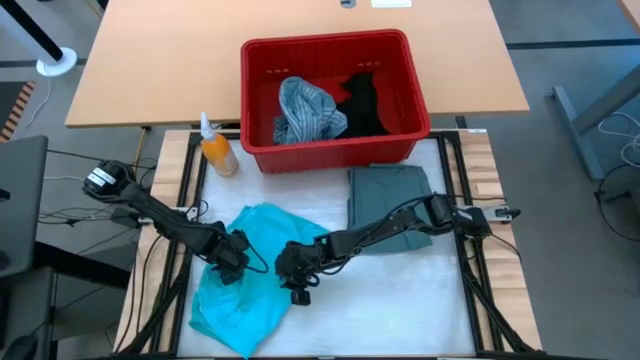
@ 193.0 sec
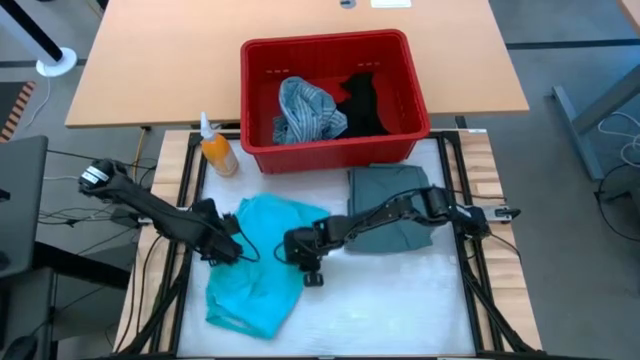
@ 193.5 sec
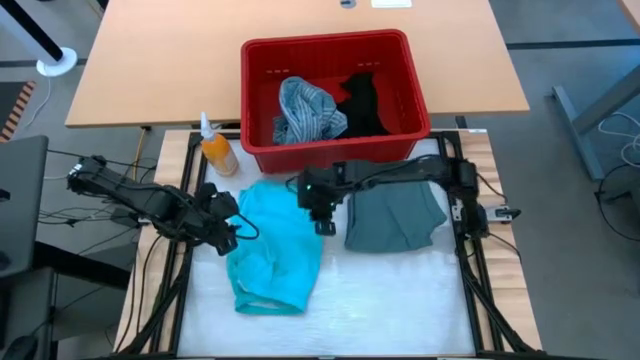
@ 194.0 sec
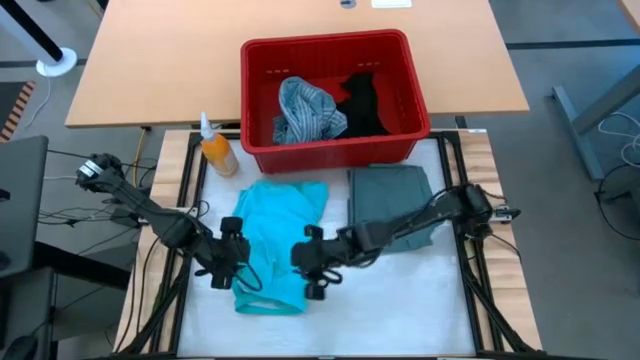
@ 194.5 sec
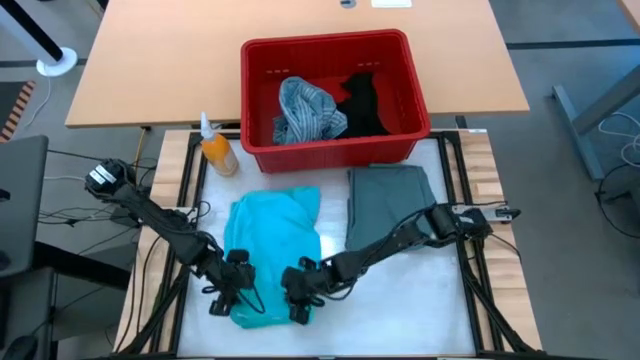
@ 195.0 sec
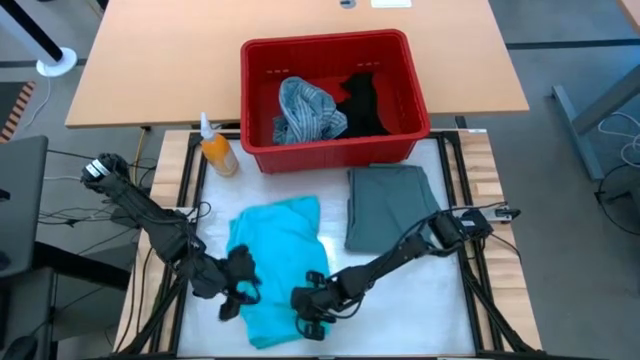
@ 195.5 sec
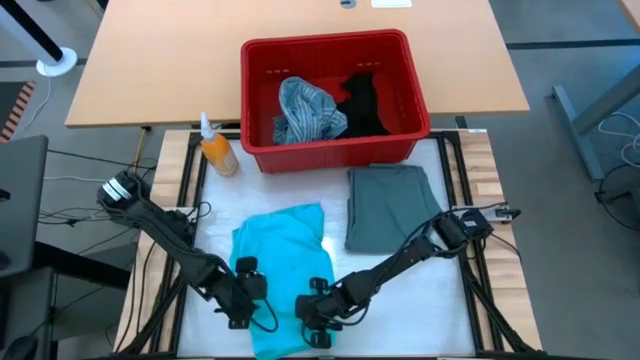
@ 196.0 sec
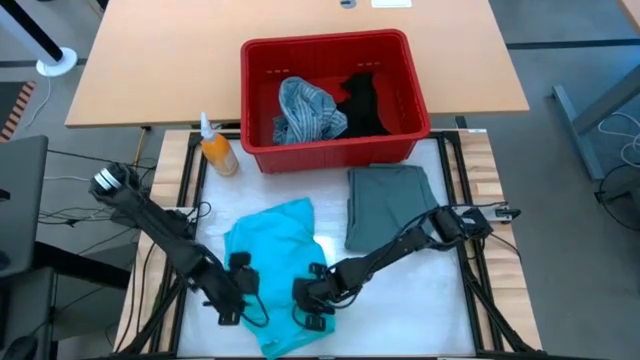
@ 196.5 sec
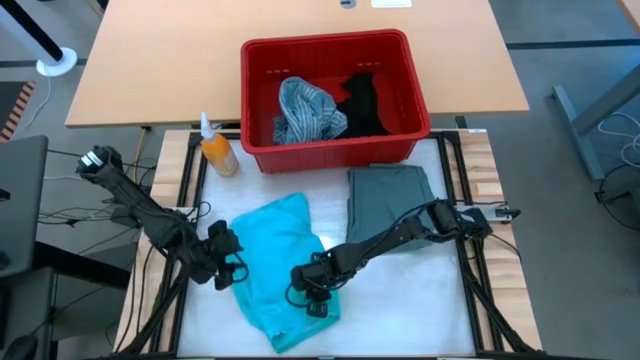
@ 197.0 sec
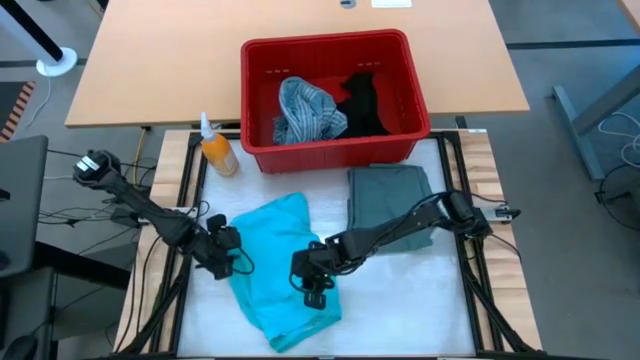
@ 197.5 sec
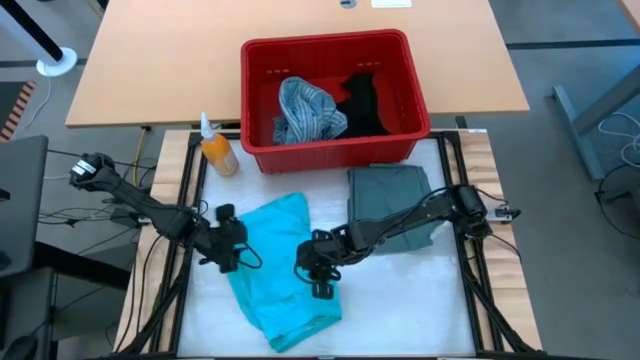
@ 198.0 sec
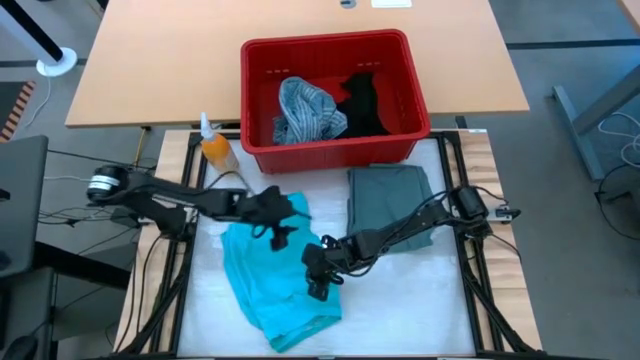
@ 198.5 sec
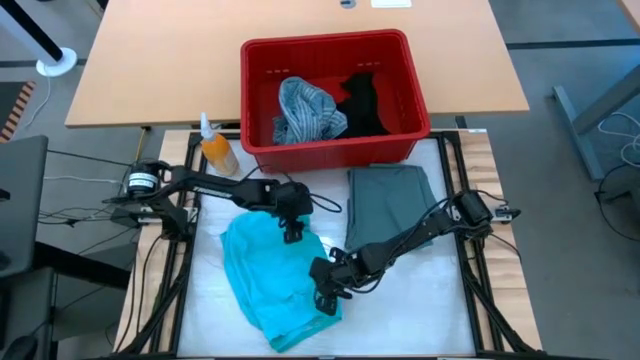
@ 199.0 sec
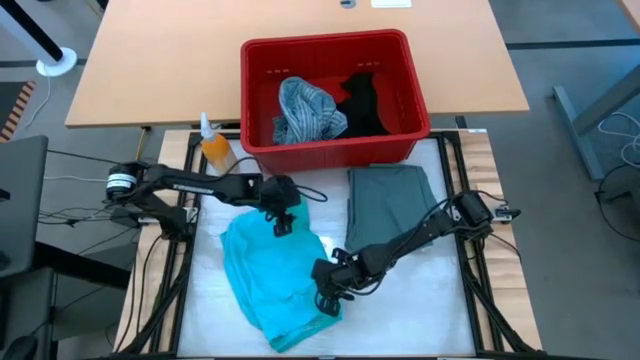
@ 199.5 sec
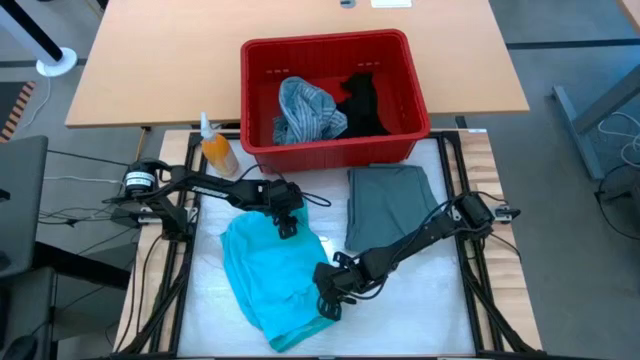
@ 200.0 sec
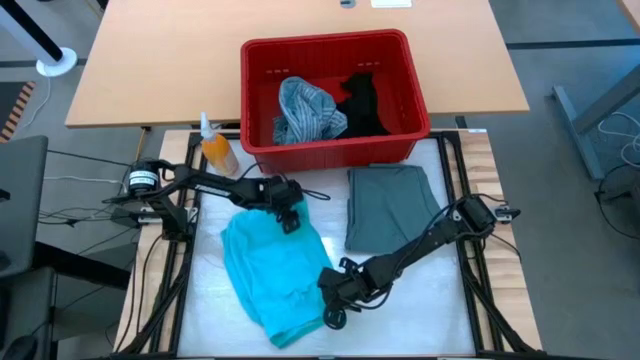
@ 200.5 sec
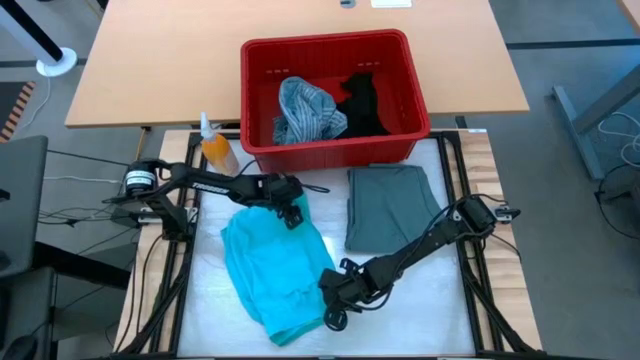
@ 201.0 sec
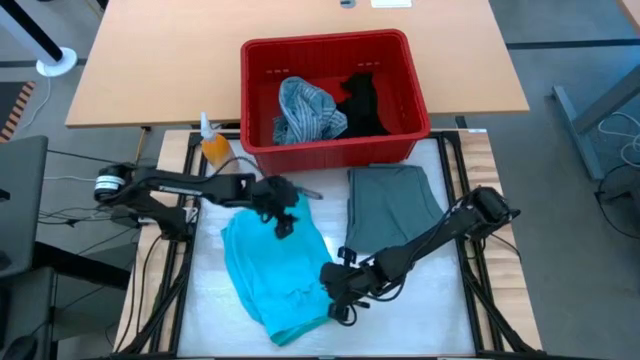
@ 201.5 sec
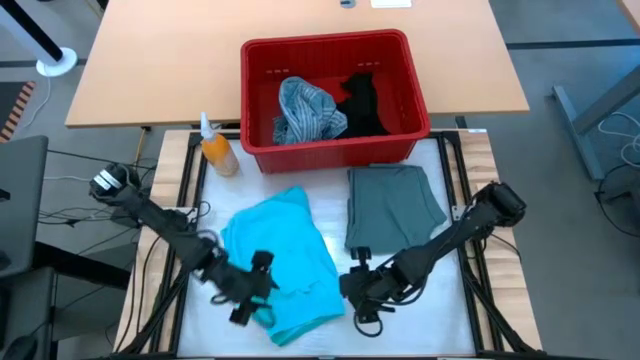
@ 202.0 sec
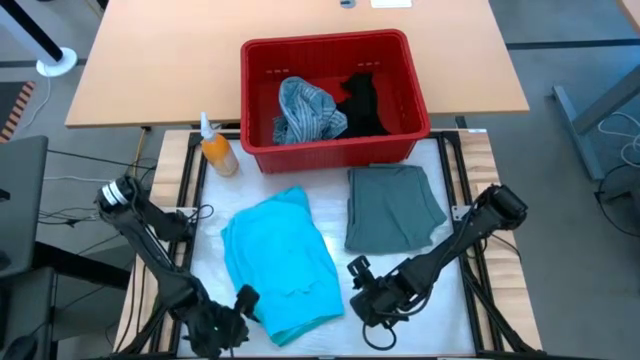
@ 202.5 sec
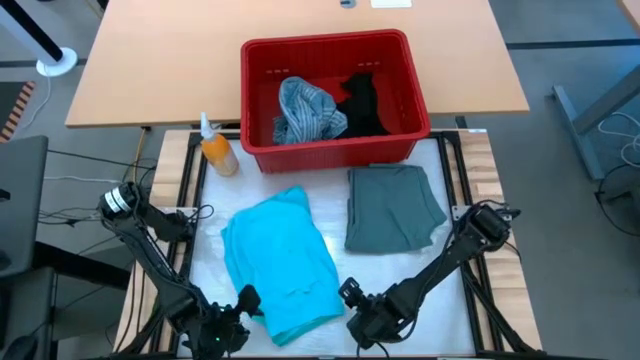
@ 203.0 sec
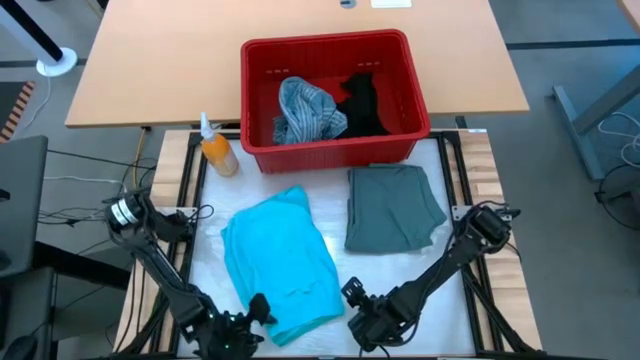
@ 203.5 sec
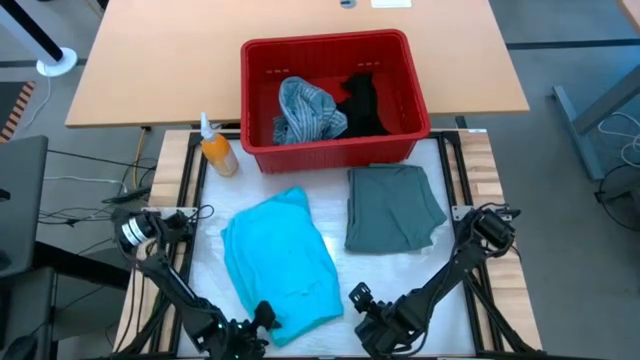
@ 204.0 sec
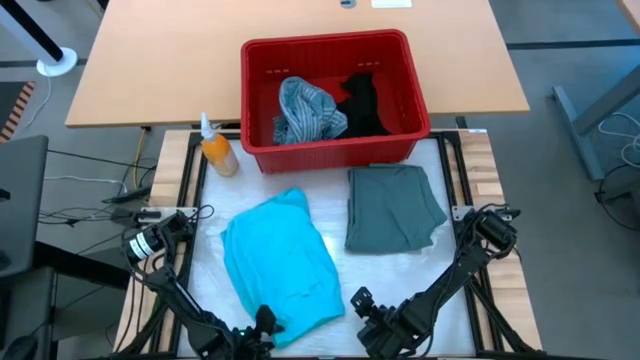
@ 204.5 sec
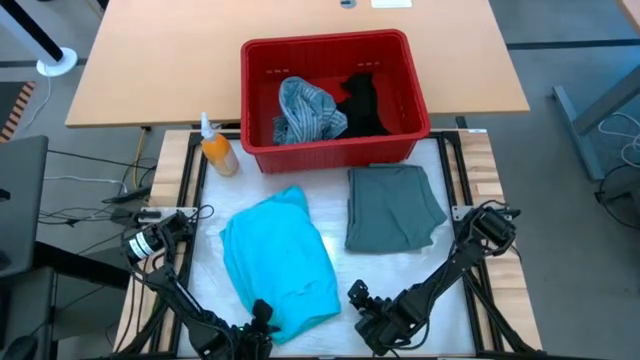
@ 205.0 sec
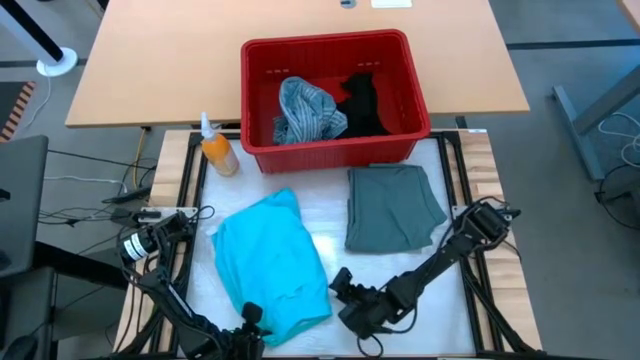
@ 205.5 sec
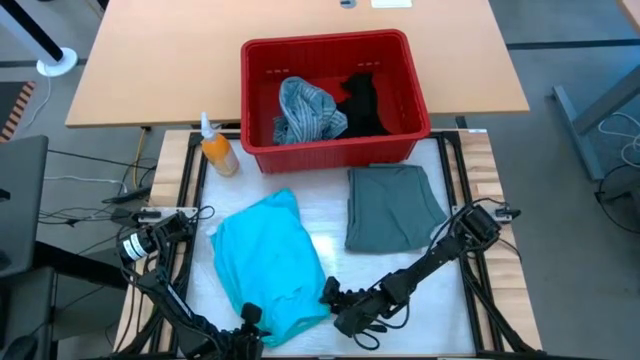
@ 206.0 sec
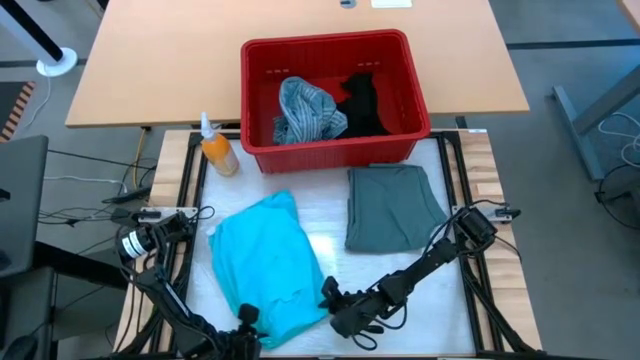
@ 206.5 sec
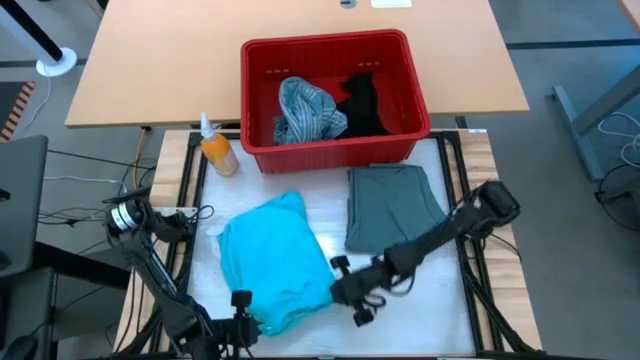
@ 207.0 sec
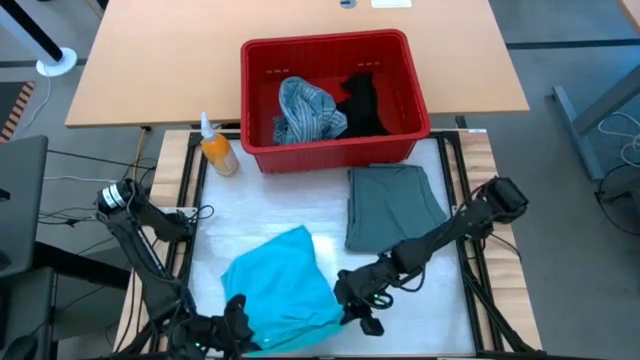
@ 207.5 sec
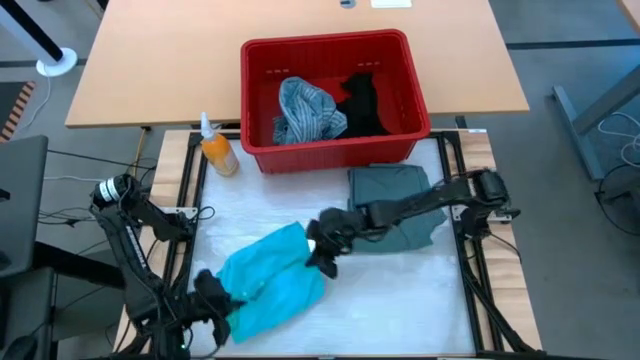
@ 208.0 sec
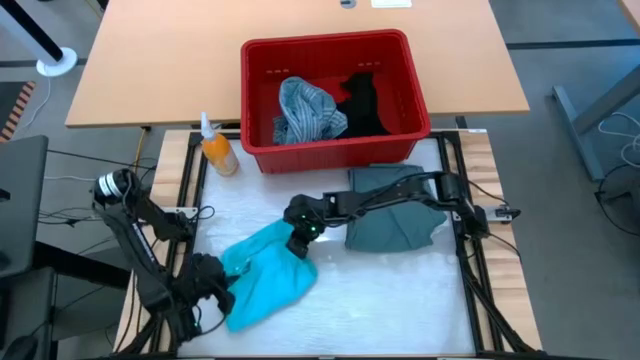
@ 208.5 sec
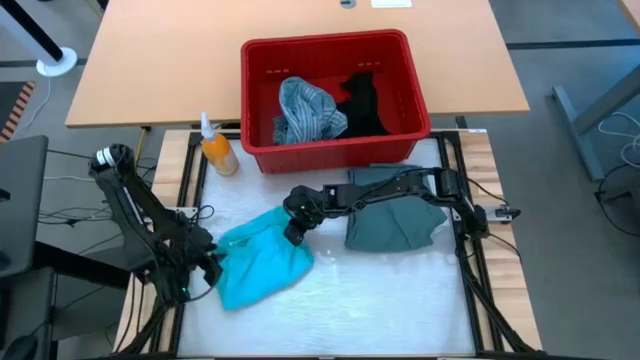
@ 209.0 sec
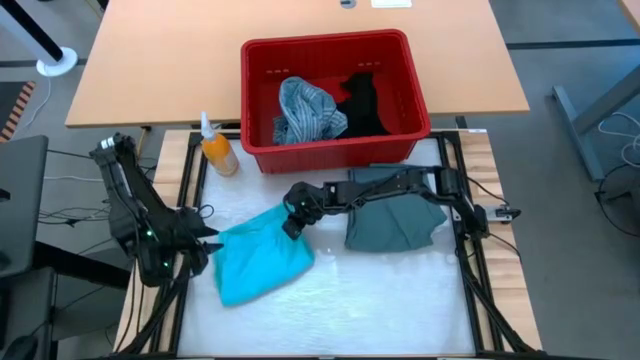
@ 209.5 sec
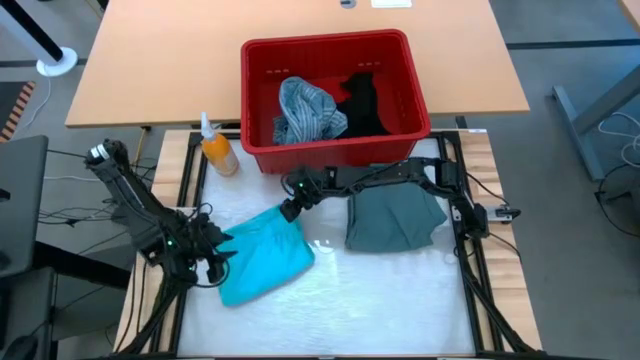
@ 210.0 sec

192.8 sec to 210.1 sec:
Task: Fold Laundry from Bin
Fold the light blue shorts

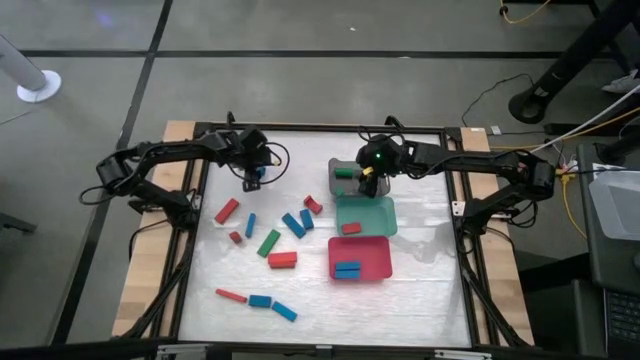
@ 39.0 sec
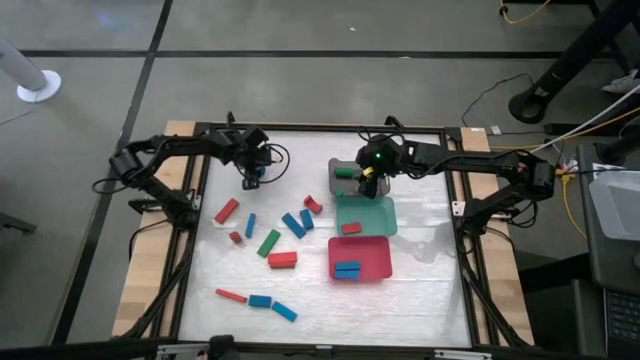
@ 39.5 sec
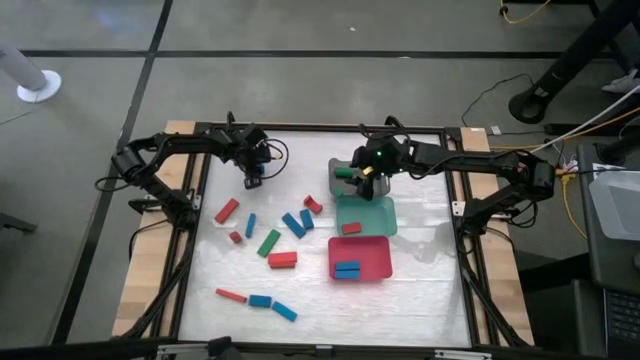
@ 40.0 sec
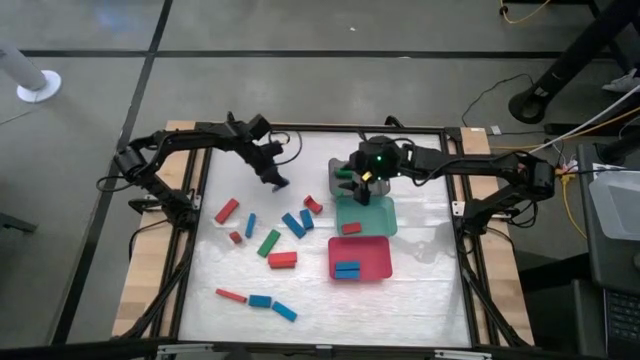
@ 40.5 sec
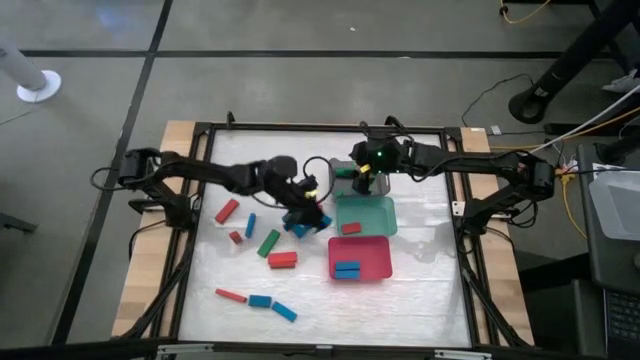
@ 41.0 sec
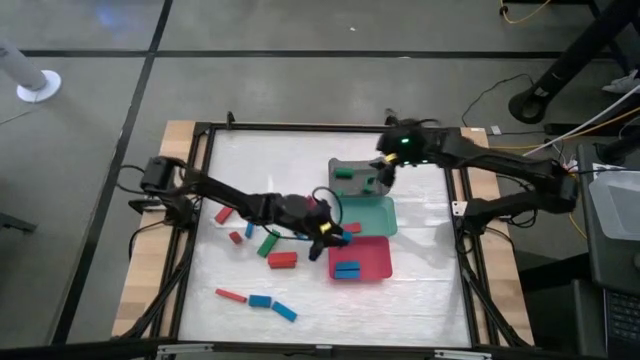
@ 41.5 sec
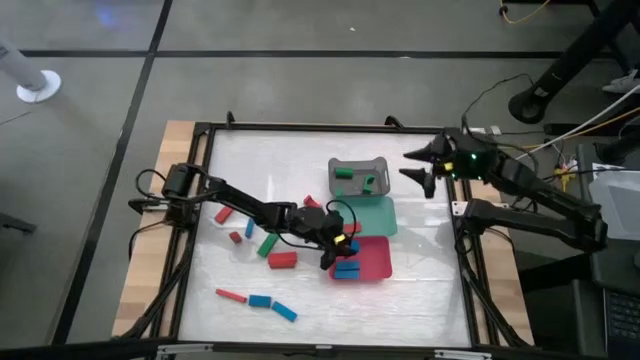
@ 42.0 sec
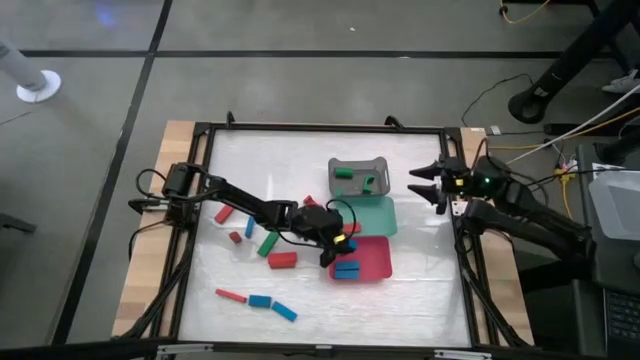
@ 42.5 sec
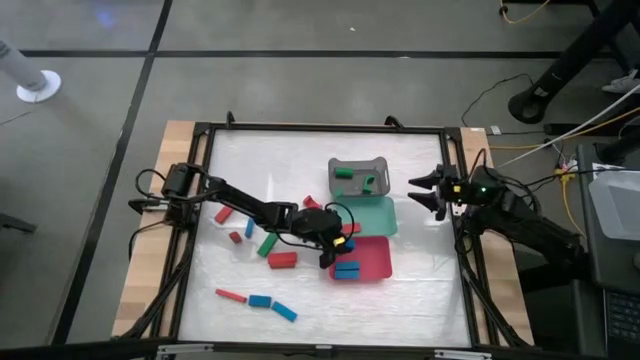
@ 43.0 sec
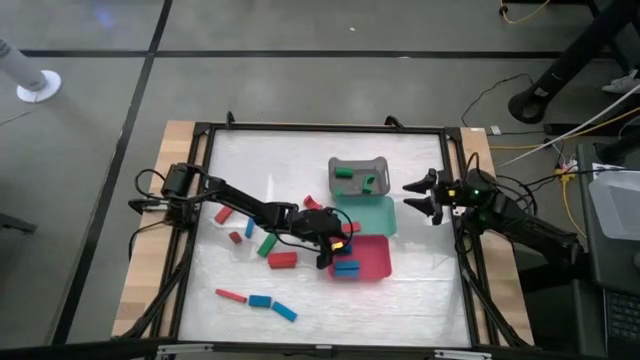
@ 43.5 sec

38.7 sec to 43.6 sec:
Task: Sort blocks
Put the blue block into the red bin
